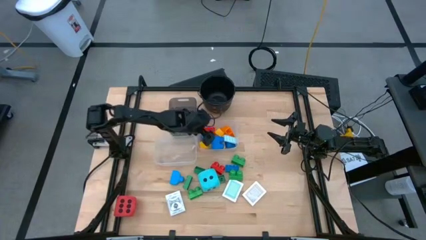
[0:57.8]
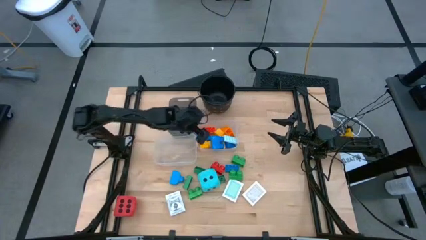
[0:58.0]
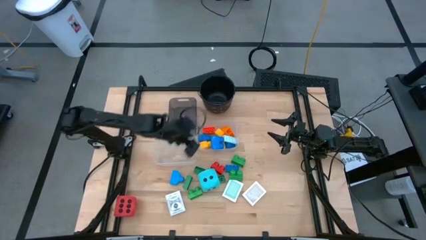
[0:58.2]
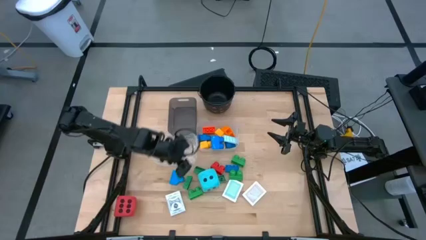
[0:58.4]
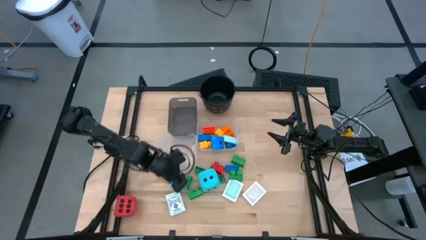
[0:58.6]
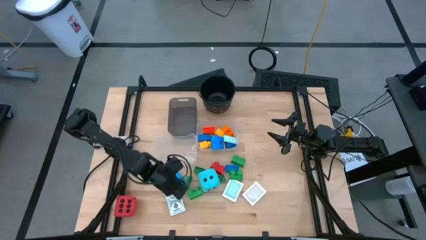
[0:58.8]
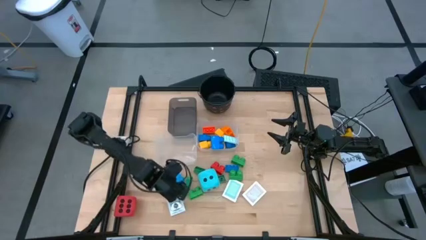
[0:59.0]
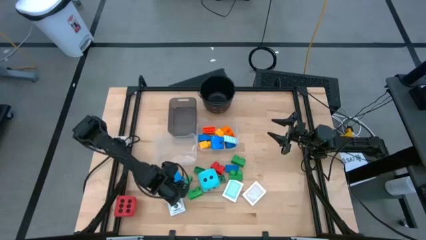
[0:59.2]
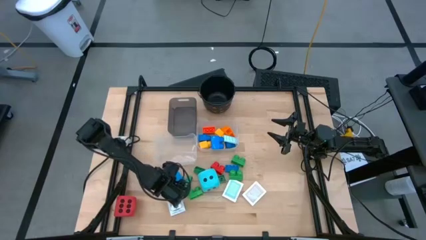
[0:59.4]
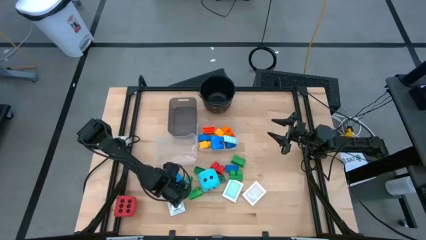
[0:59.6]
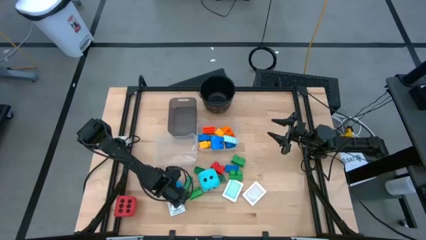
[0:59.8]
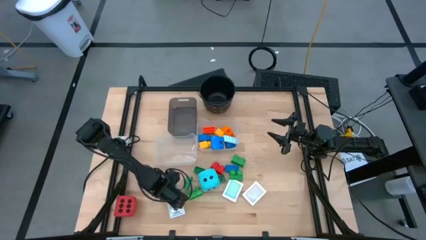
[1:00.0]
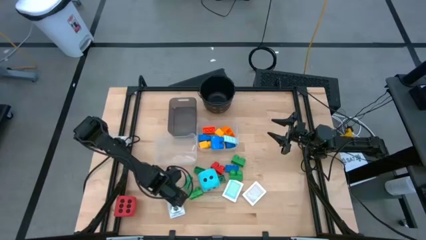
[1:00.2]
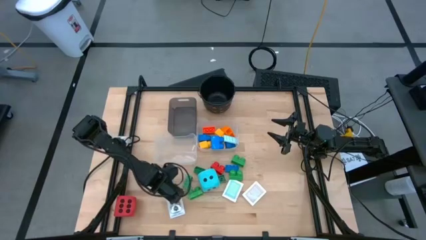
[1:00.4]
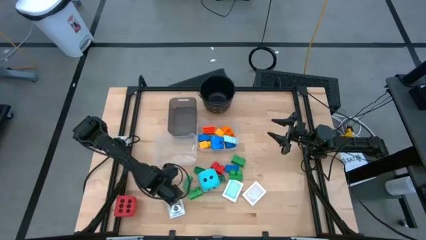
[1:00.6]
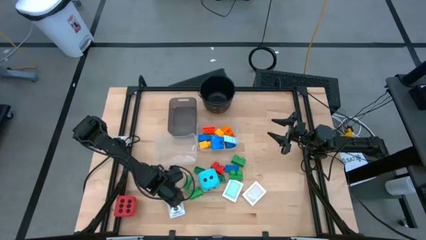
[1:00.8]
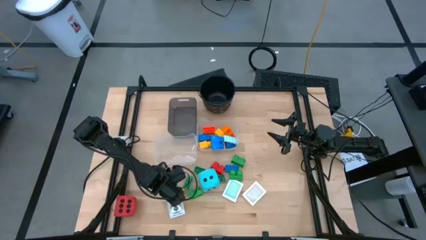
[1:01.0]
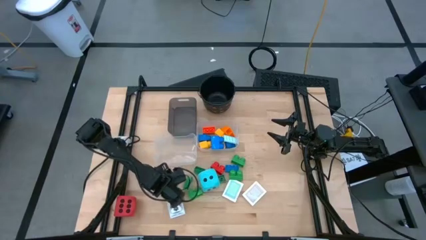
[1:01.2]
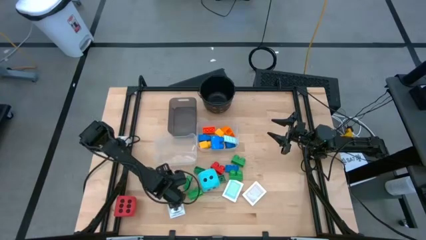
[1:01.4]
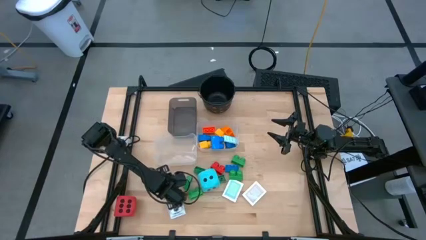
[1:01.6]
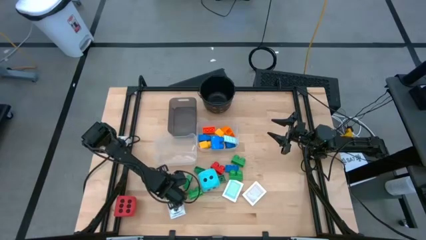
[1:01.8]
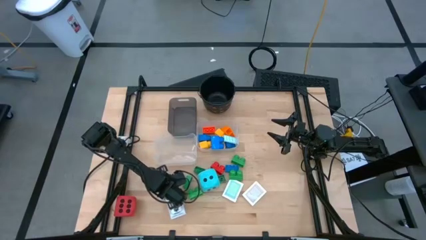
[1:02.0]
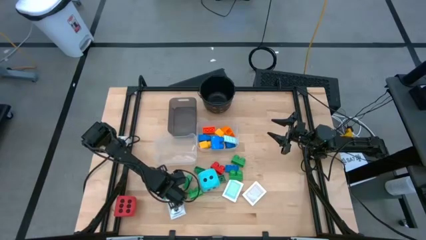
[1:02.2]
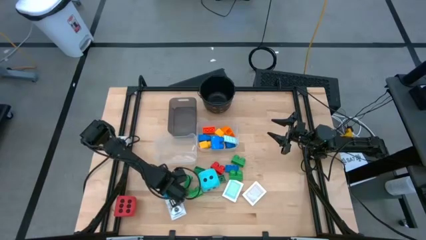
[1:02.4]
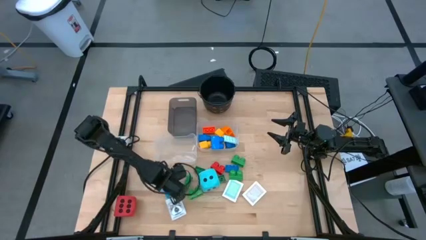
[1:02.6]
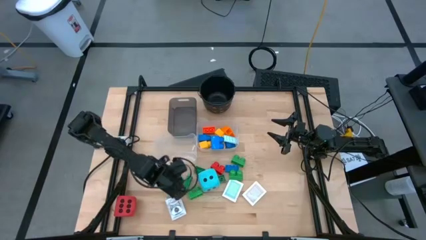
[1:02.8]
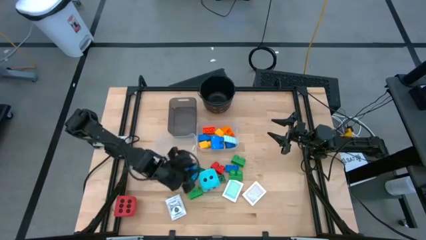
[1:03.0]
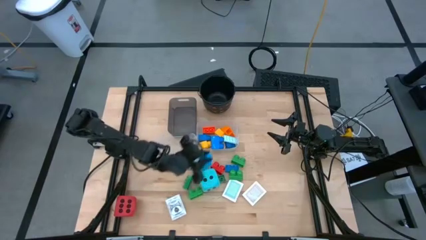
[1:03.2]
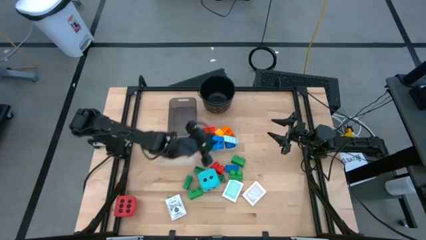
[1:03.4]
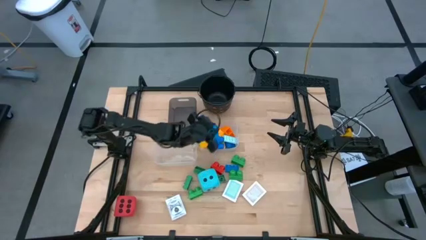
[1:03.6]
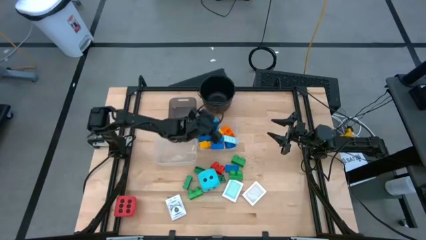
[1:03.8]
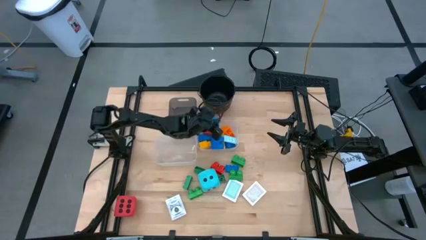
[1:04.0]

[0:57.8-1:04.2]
Task: Pick & Place Toys
Put the blue game piece into the right transparent bin

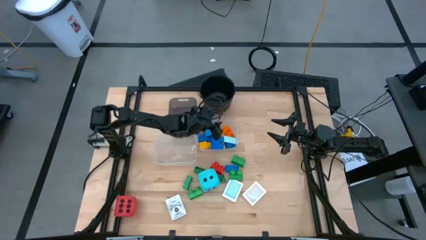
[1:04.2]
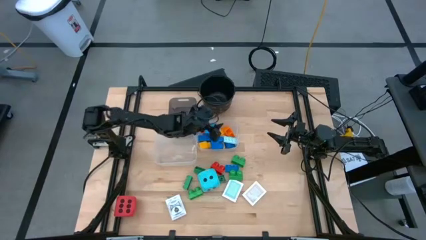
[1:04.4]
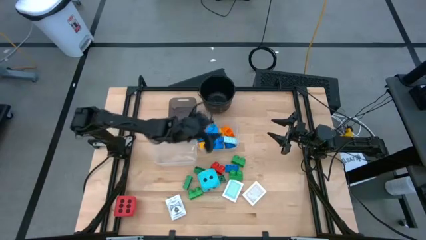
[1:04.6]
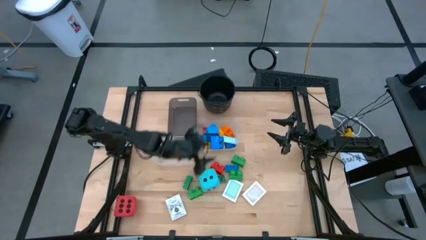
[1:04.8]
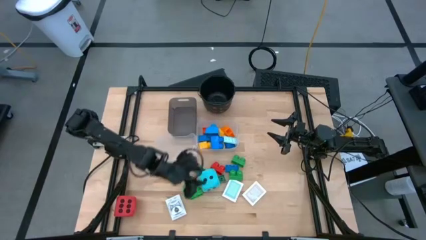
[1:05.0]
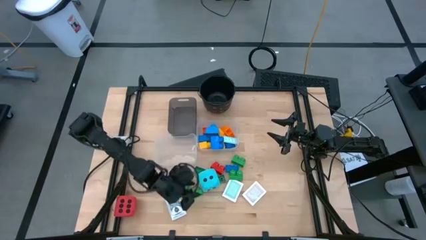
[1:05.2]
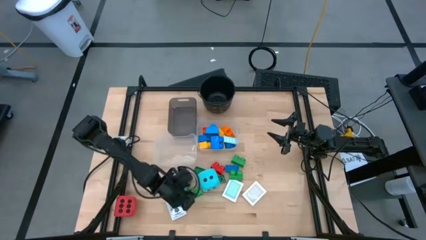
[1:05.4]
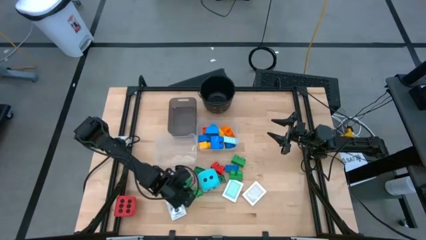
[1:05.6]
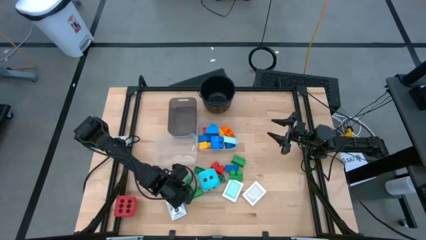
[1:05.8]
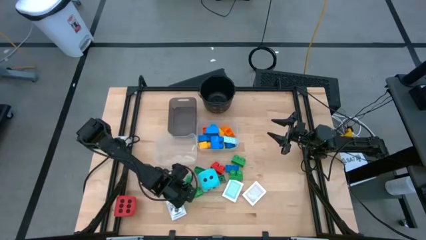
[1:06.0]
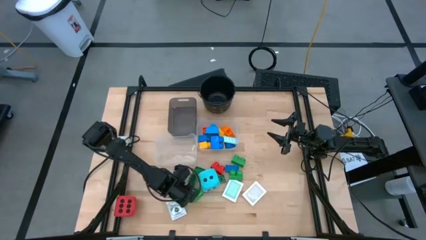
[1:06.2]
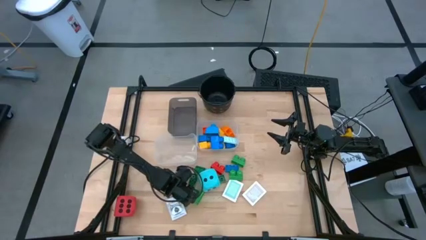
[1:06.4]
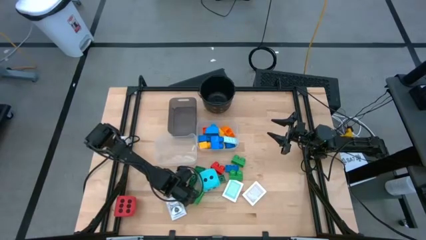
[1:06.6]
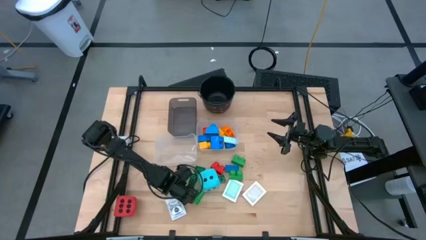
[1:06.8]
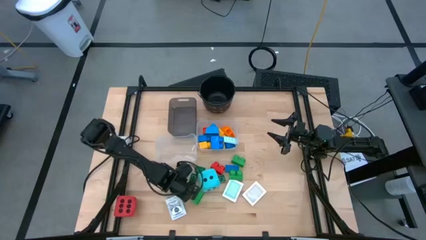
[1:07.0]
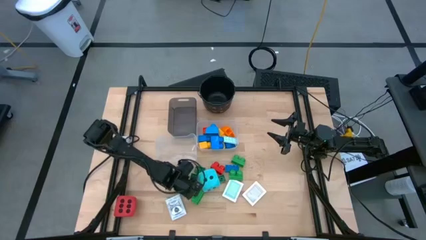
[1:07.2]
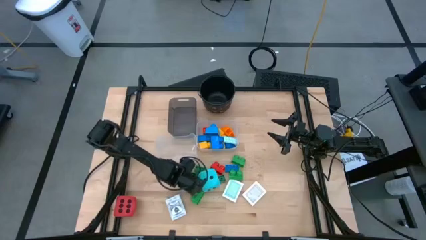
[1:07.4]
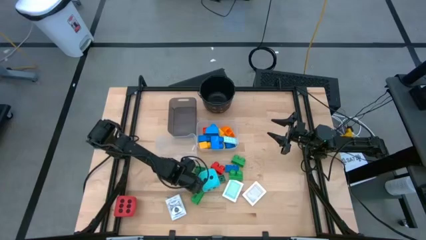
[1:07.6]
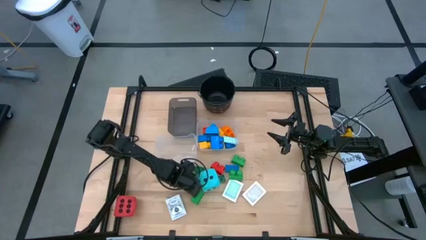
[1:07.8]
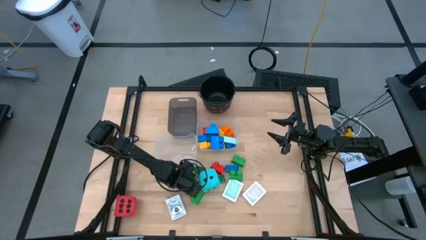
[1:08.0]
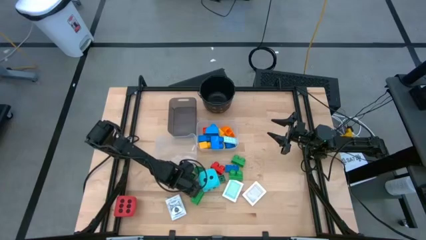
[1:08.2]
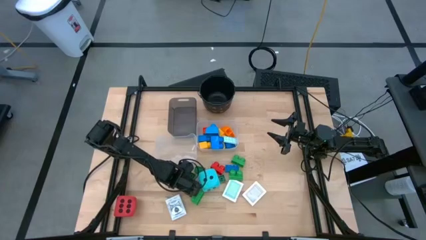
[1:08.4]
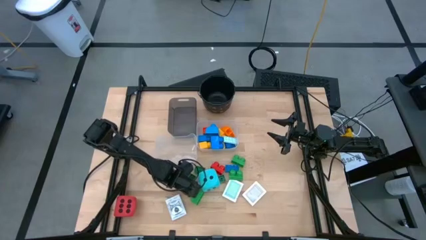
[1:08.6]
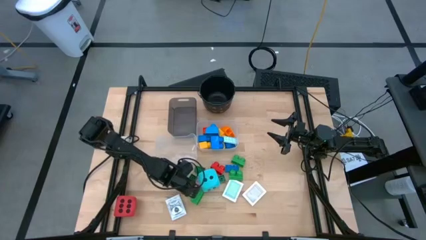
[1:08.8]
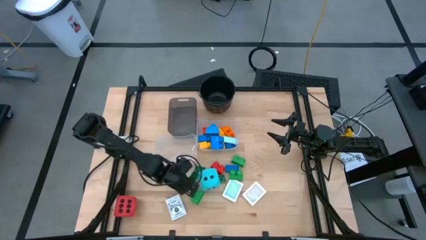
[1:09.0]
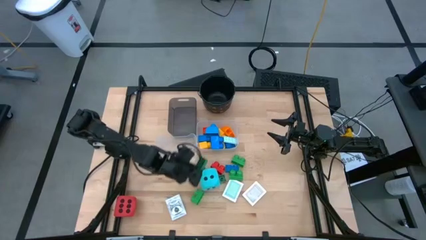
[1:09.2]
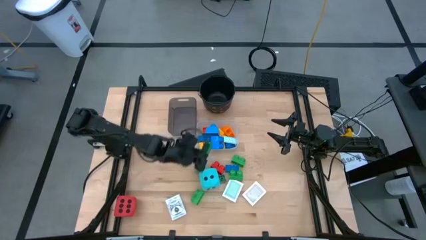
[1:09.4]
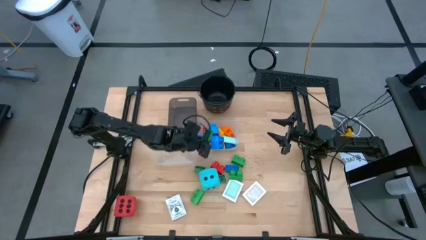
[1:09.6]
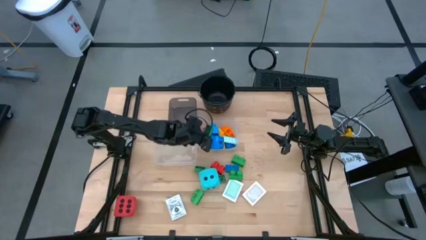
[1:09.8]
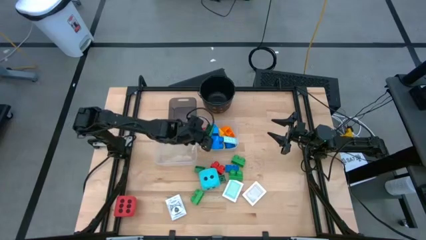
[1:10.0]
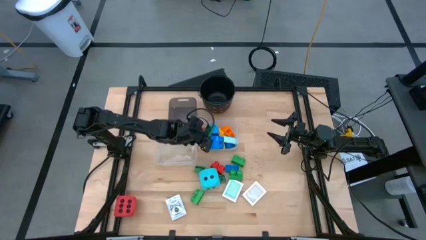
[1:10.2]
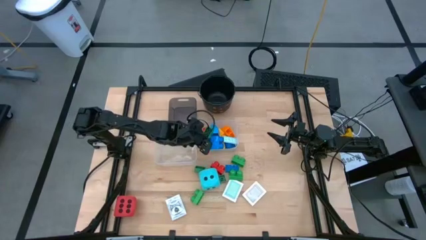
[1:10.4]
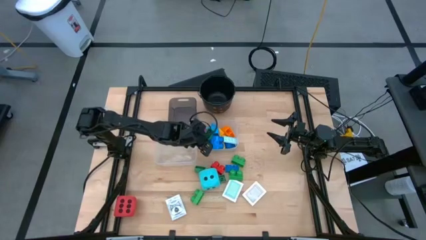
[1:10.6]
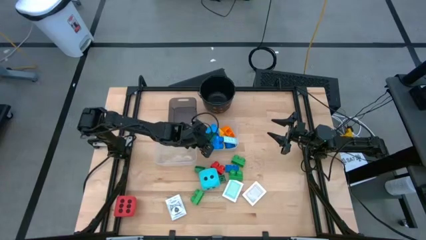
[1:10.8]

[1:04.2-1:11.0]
Put the green game piece into the right transparent bin

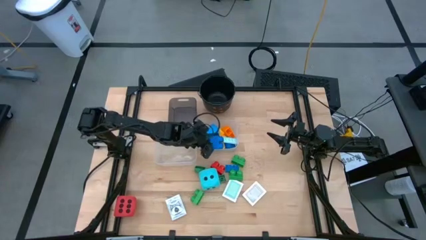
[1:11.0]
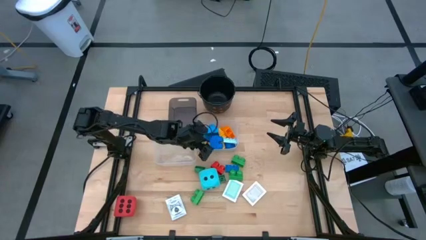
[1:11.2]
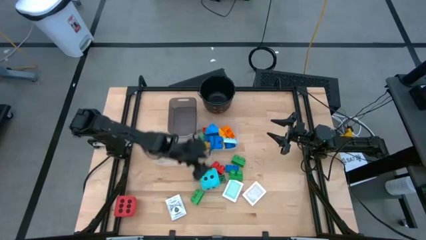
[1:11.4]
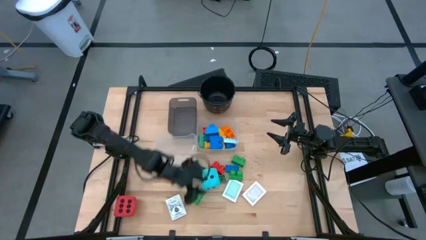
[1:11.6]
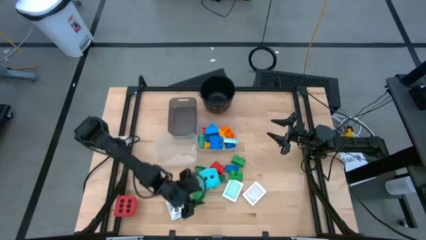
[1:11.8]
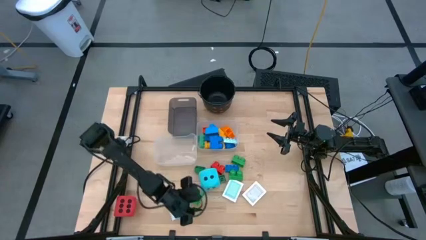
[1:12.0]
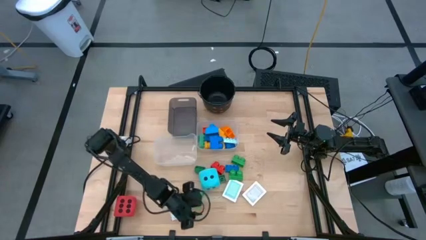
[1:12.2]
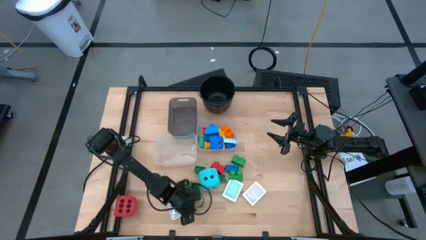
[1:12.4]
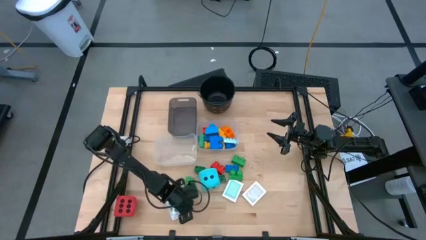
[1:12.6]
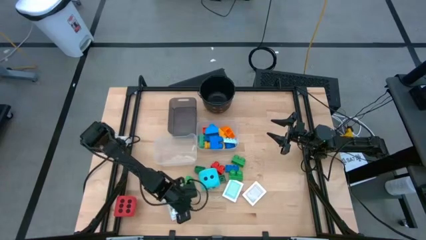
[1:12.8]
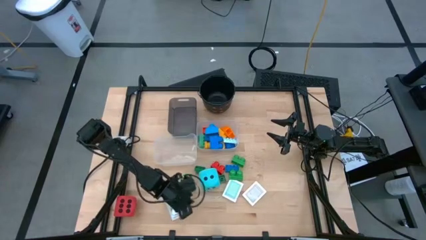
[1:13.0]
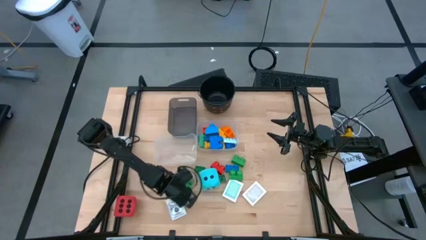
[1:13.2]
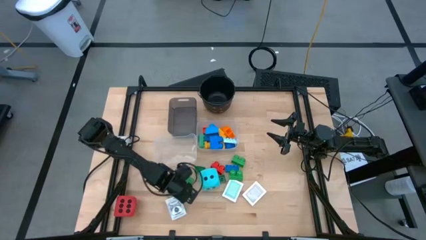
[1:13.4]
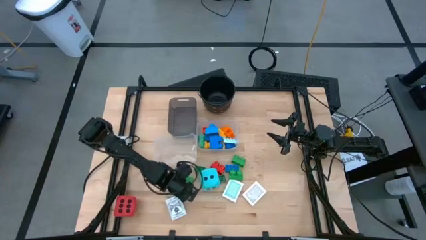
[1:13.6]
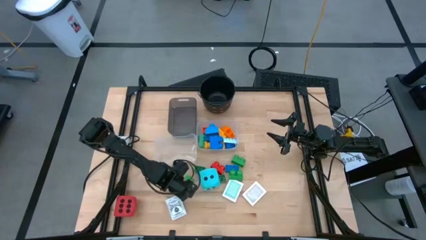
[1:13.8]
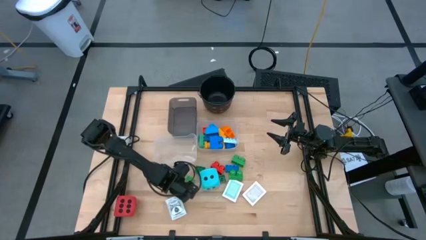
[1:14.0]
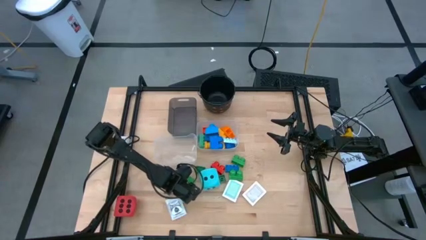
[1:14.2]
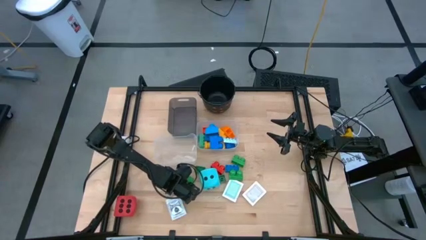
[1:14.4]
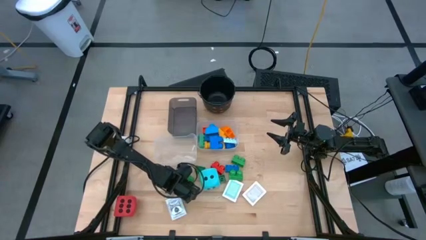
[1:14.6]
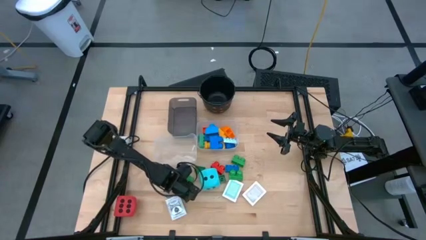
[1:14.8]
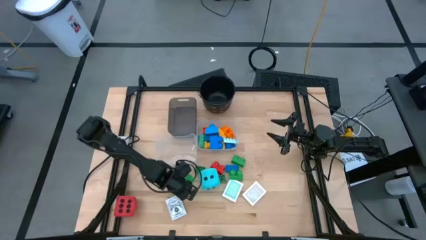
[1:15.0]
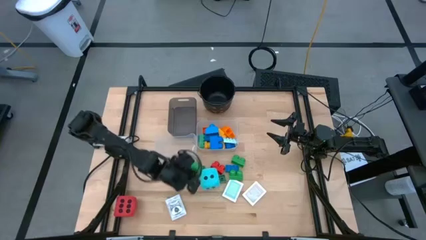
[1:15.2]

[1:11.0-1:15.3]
Put the green game piece into the right transparent bin
